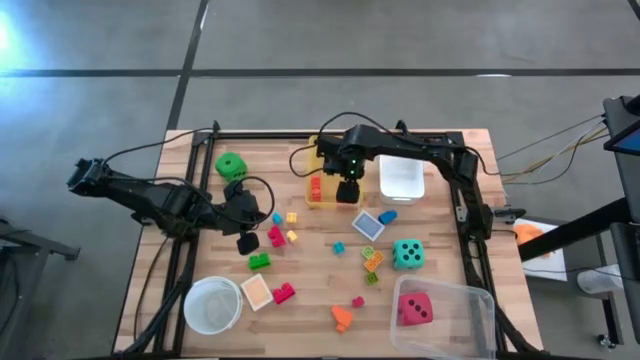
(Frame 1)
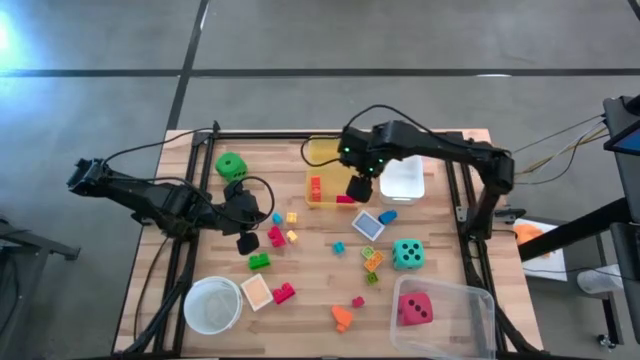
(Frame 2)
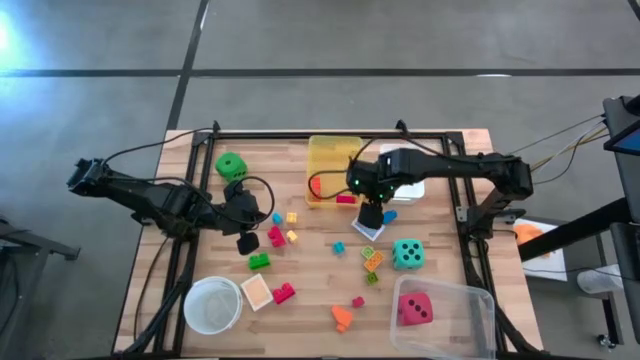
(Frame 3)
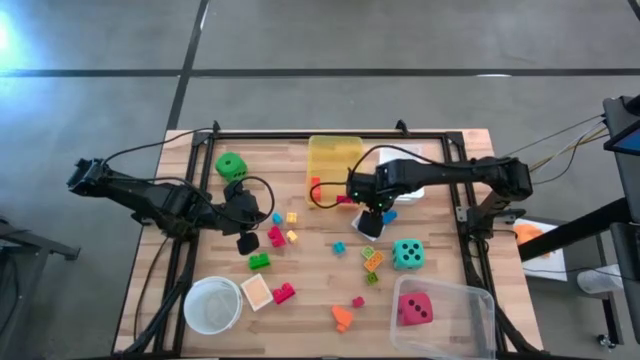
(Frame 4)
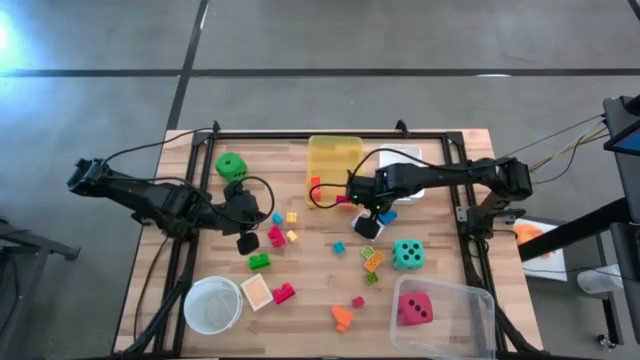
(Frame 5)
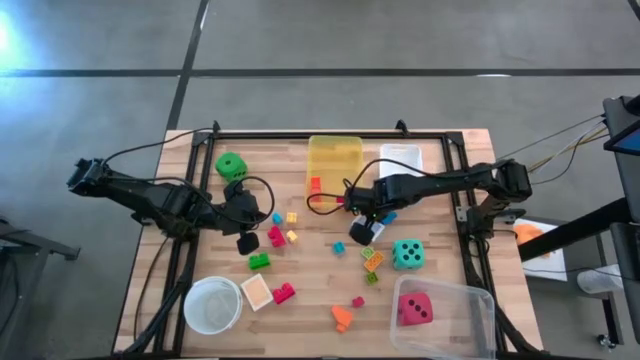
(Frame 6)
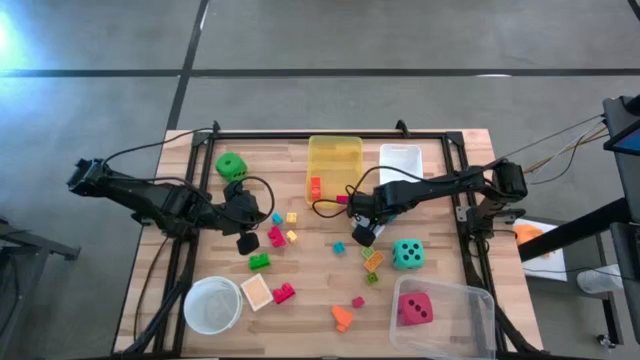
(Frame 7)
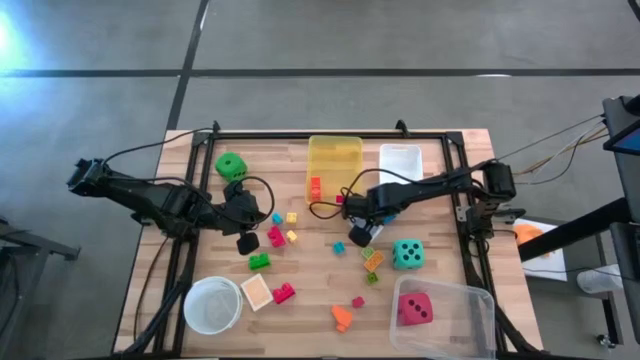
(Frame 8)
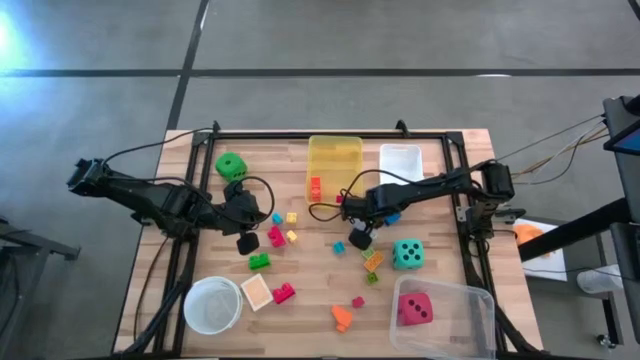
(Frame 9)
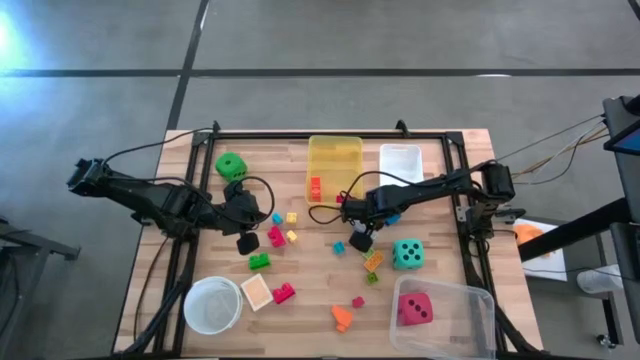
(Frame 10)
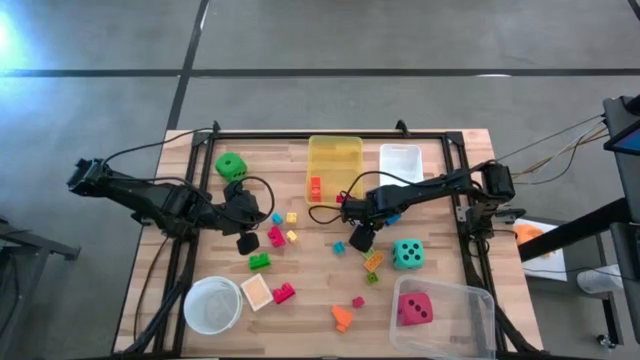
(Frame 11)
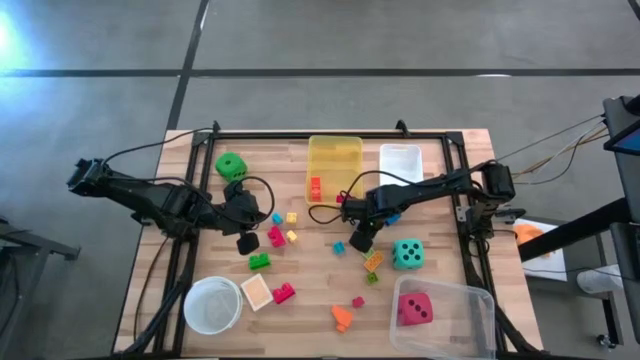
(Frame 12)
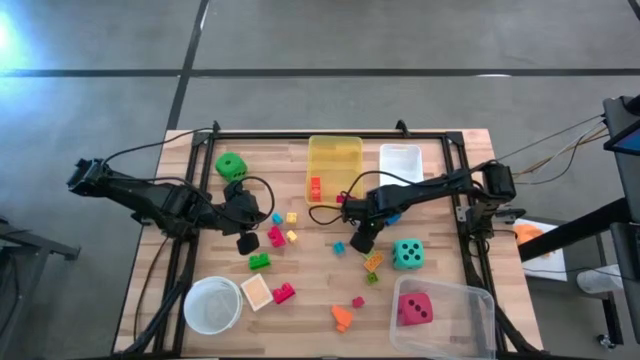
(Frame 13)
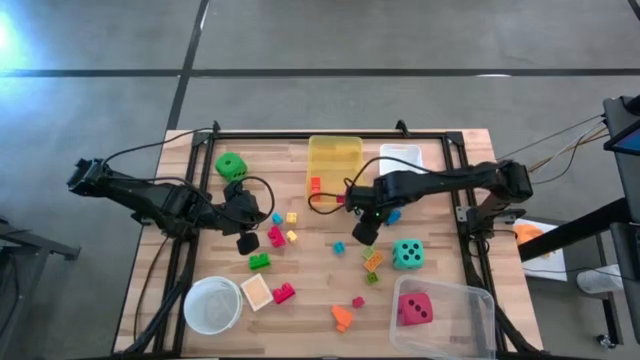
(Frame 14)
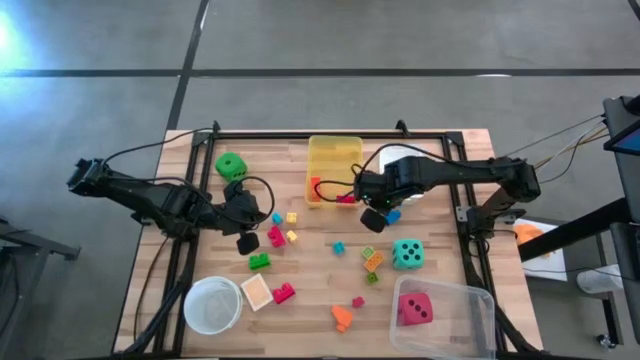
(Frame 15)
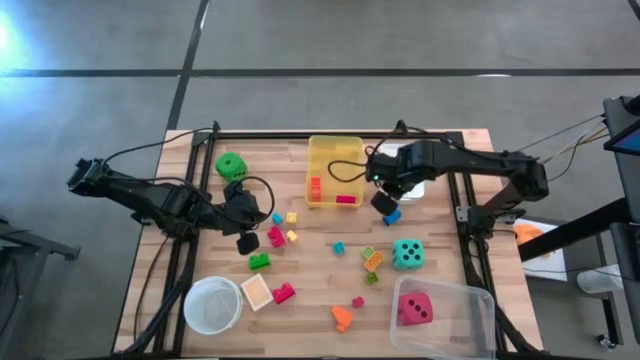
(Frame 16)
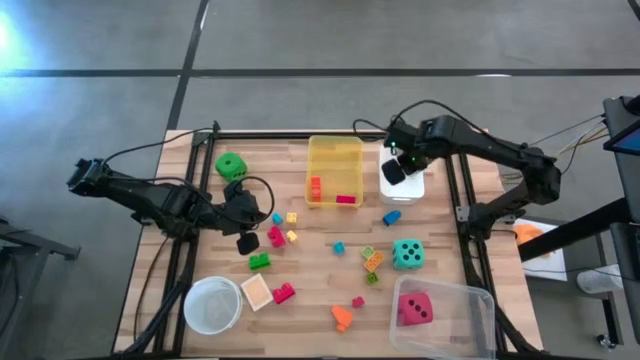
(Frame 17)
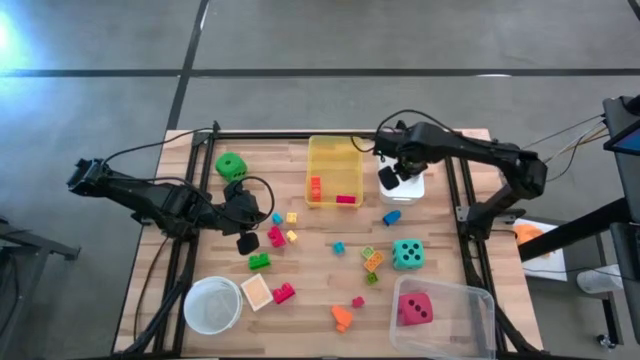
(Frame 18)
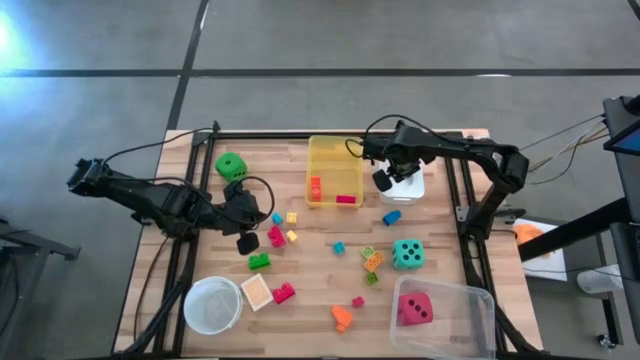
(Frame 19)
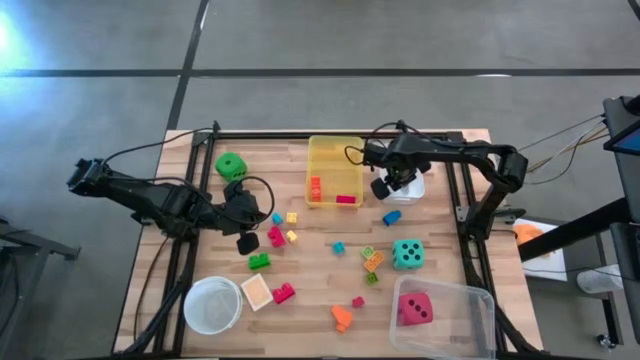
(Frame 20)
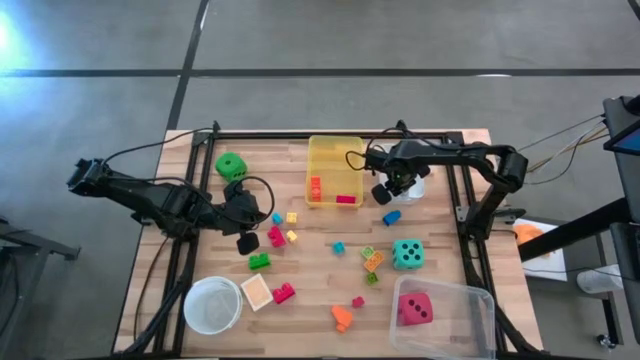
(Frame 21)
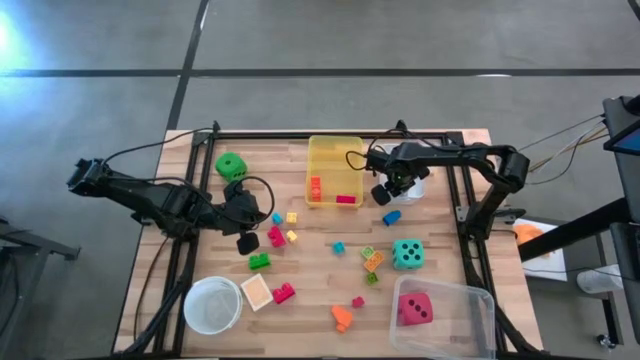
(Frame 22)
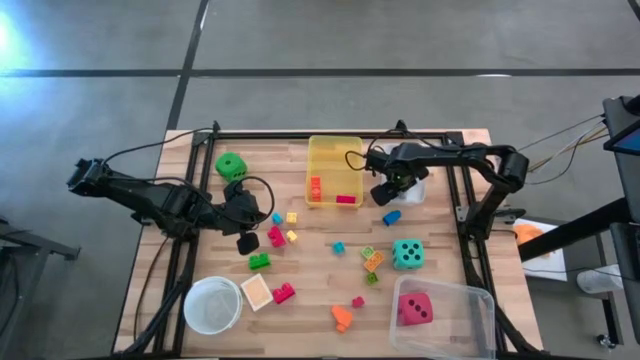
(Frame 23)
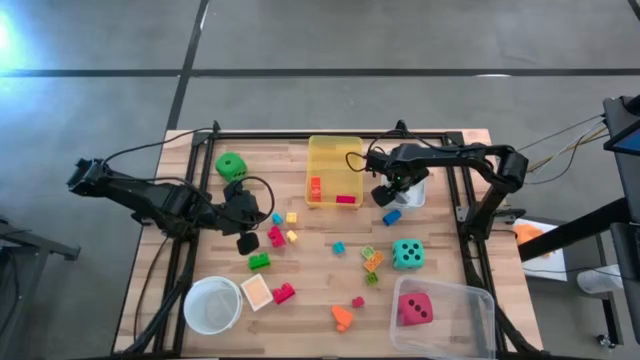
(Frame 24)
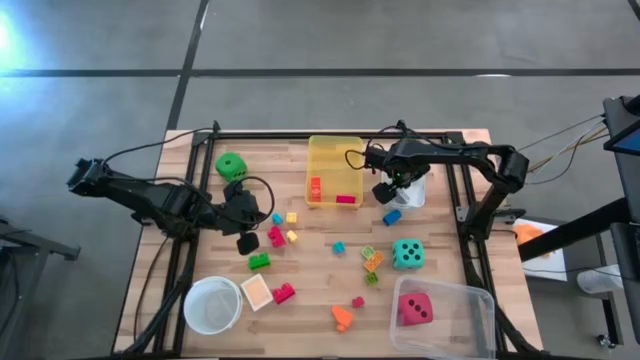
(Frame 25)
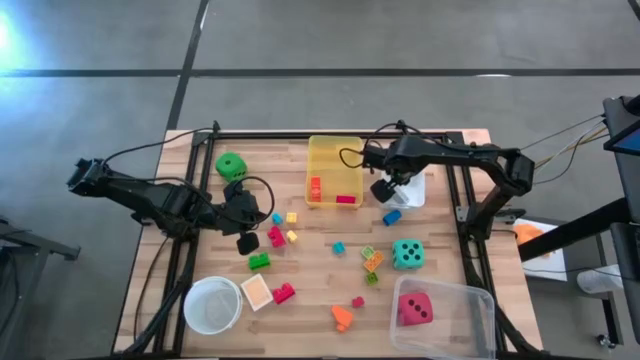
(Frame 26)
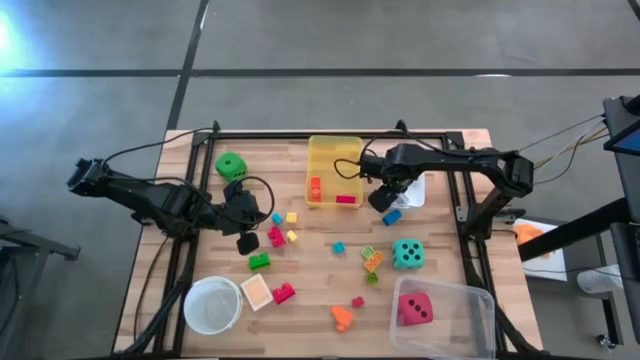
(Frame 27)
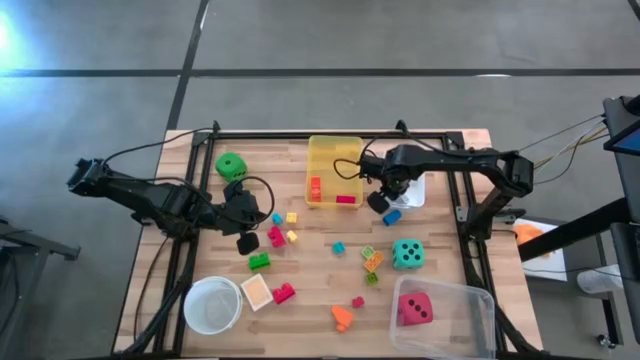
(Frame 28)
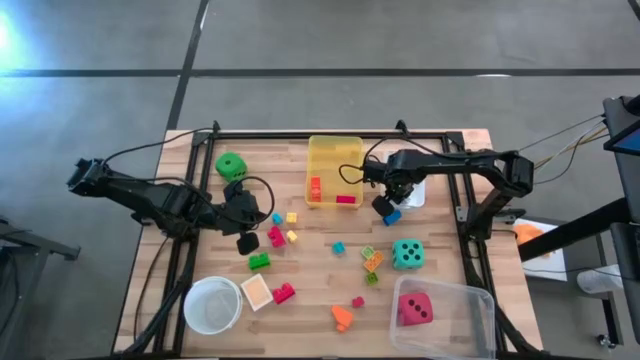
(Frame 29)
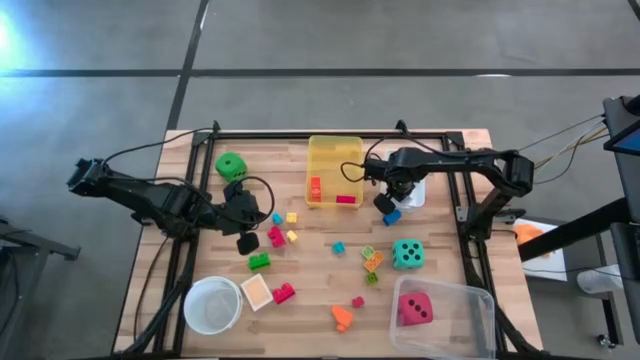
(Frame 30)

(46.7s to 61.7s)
Task: Pick & Place Toys
Put the blue deck of cards into the white bin

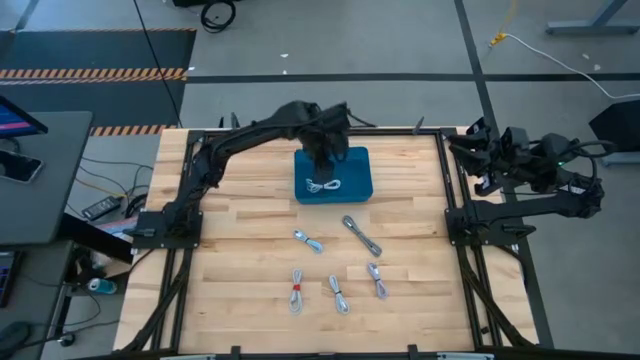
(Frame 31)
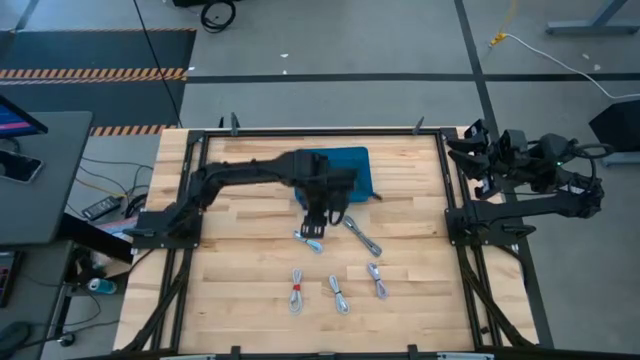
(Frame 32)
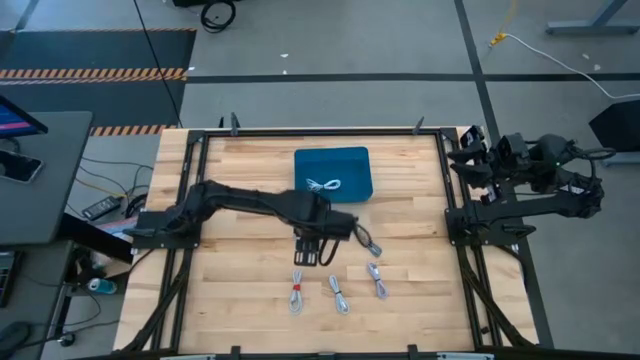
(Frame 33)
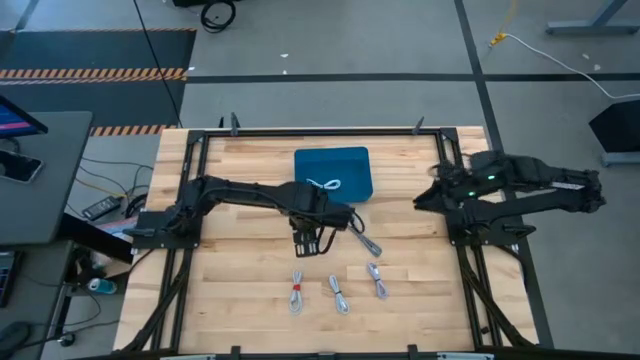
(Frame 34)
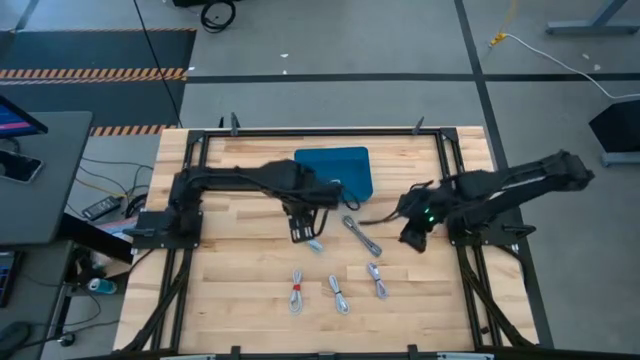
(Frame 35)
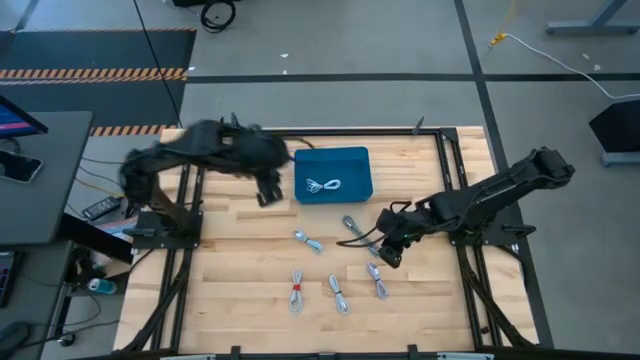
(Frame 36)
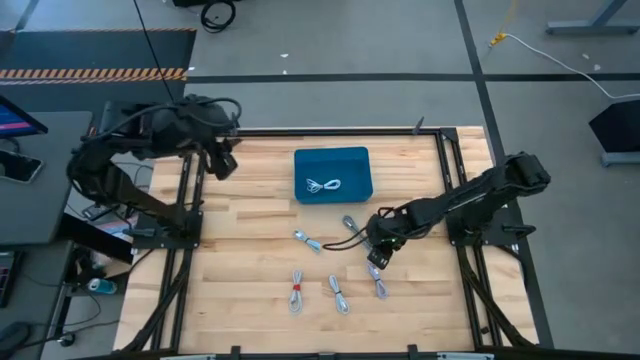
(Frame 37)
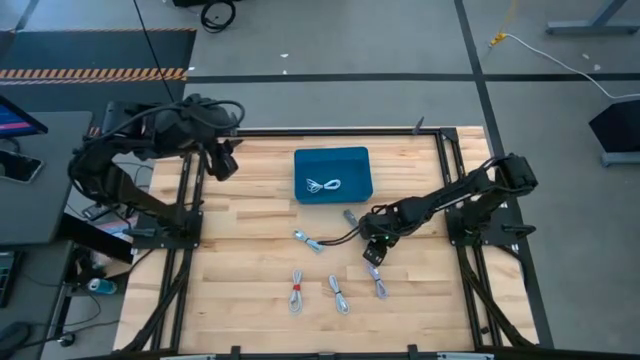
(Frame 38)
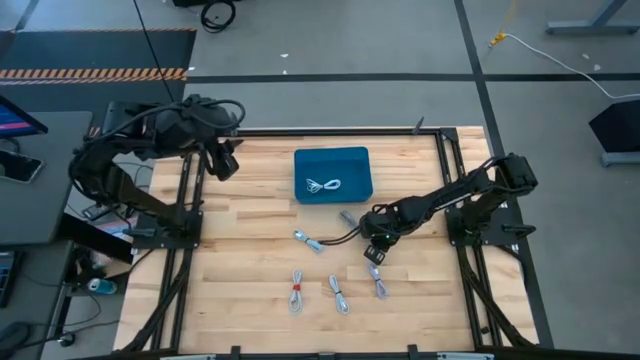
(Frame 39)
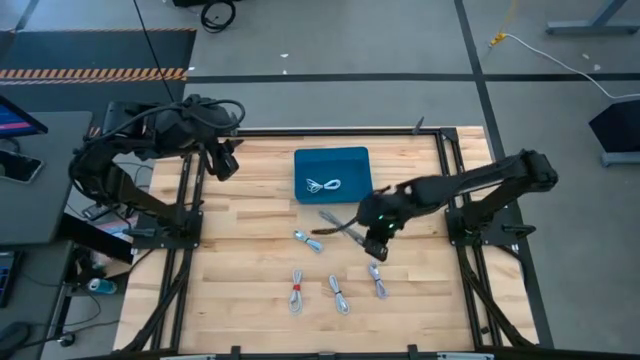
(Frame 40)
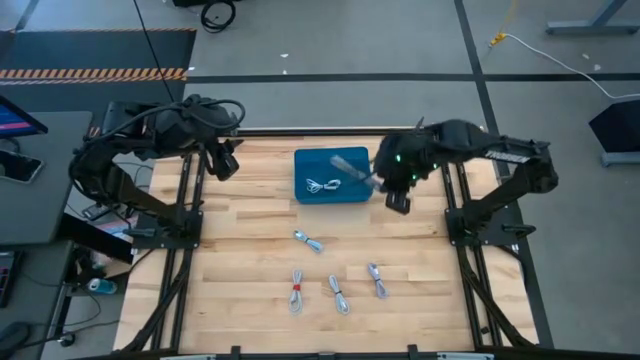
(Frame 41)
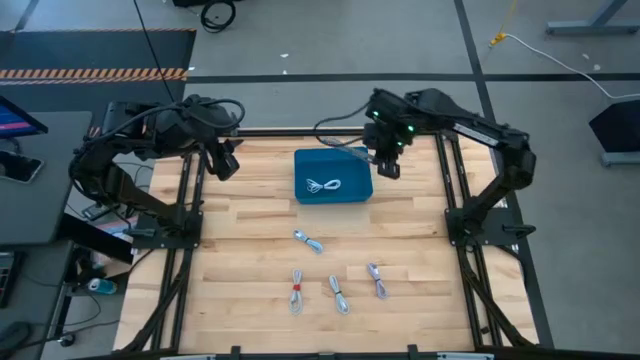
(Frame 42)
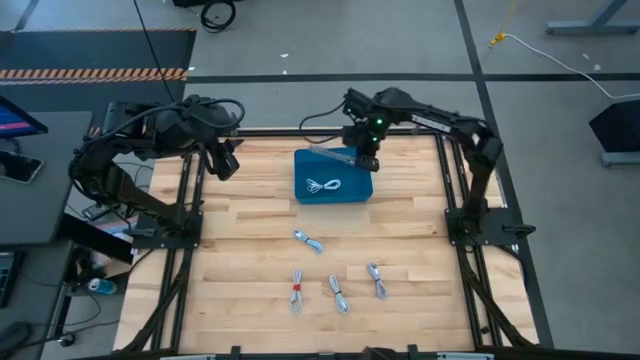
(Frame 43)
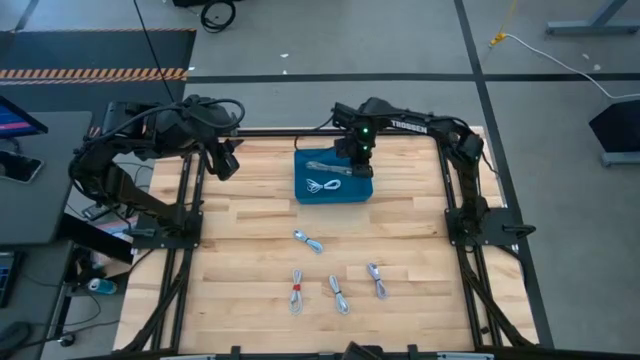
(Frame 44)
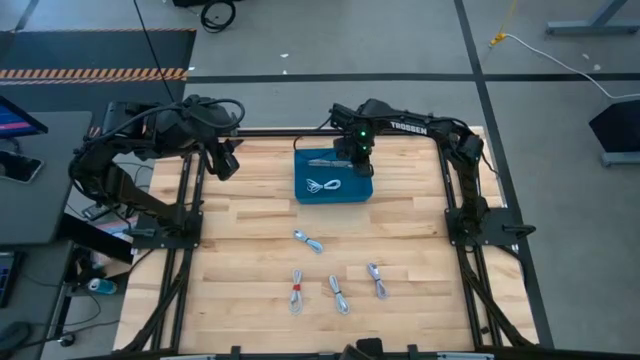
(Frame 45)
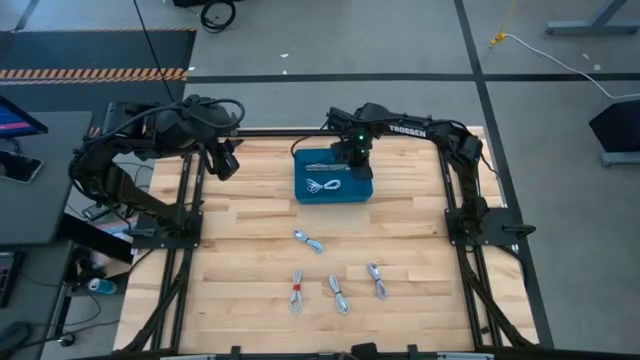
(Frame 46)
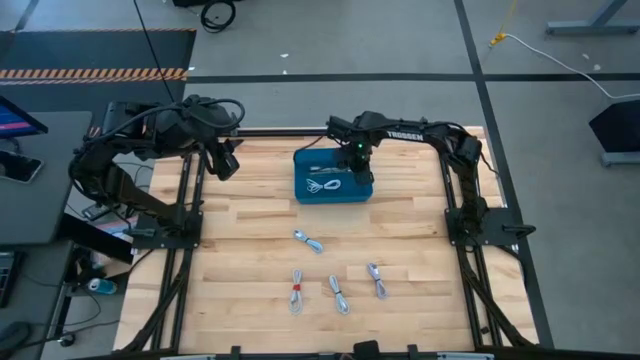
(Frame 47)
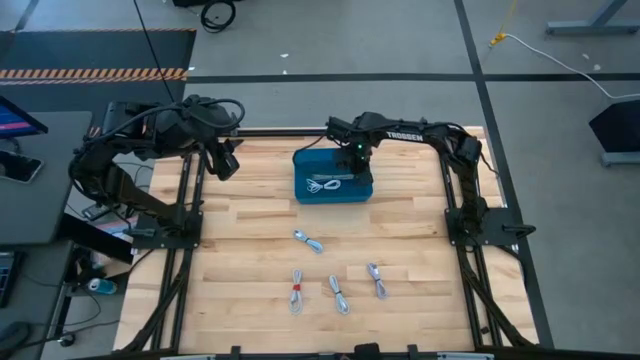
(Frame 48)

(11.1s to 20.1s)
Task: Pick and place USB-C Cables
Put the gray charger cable into the blue bin
